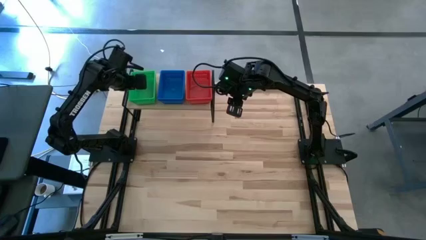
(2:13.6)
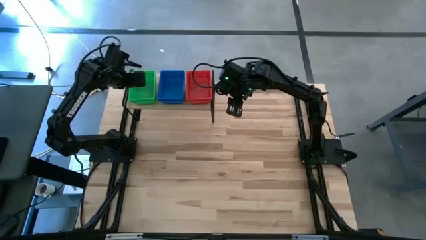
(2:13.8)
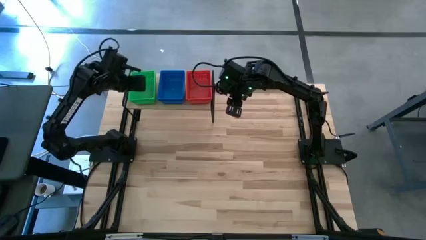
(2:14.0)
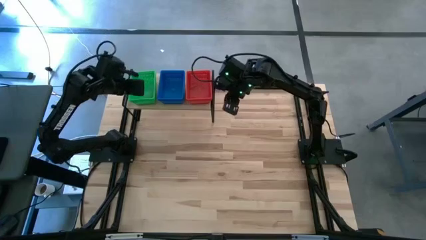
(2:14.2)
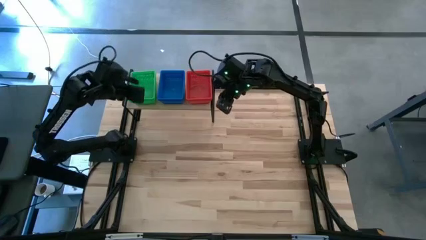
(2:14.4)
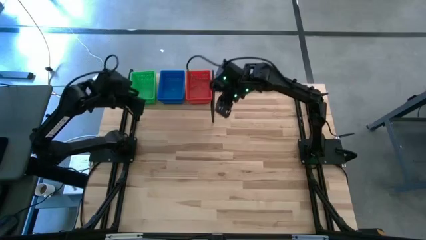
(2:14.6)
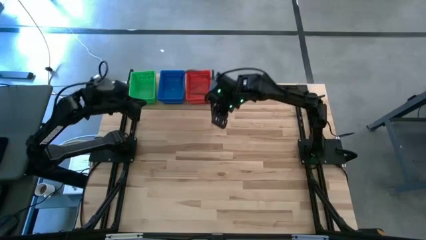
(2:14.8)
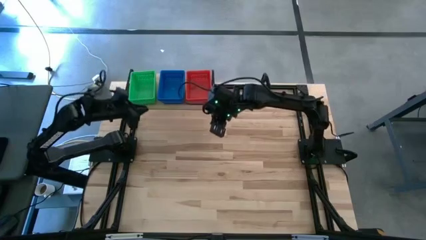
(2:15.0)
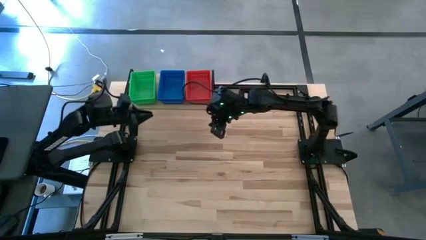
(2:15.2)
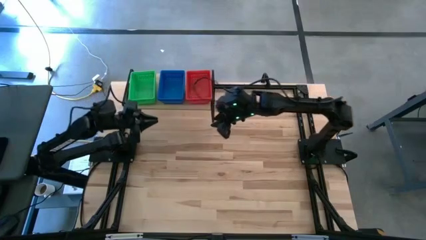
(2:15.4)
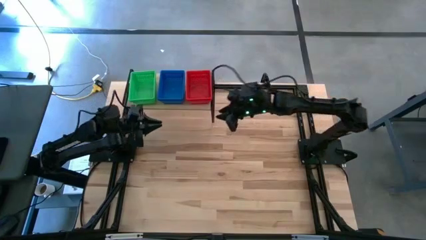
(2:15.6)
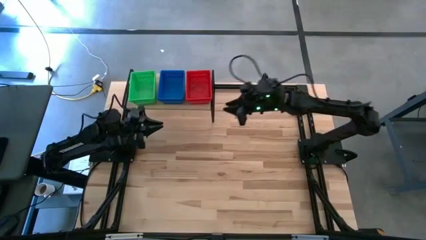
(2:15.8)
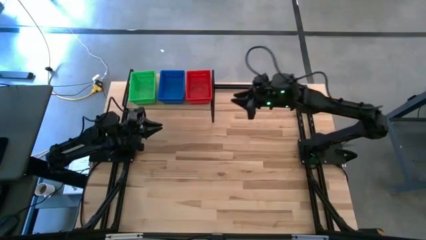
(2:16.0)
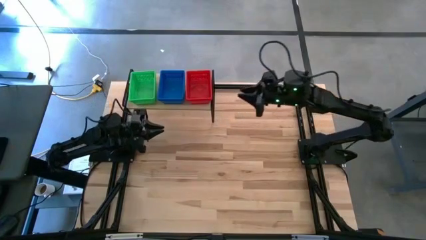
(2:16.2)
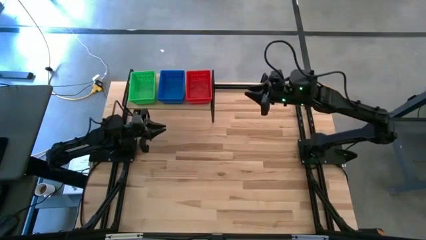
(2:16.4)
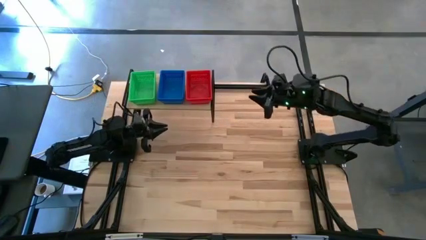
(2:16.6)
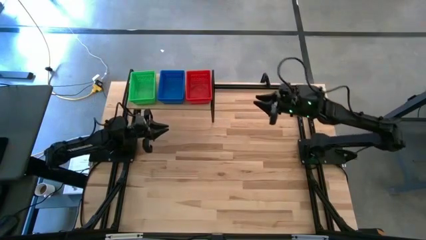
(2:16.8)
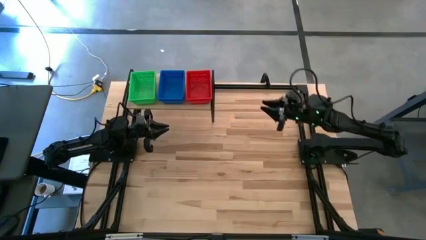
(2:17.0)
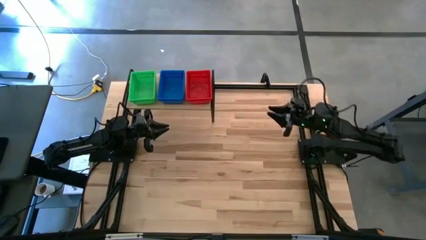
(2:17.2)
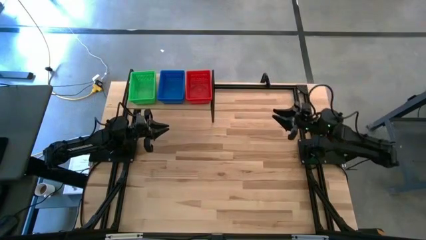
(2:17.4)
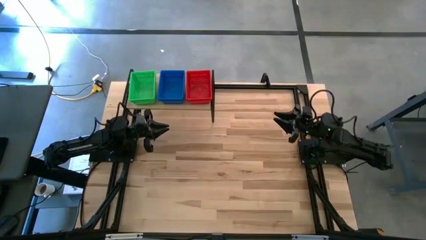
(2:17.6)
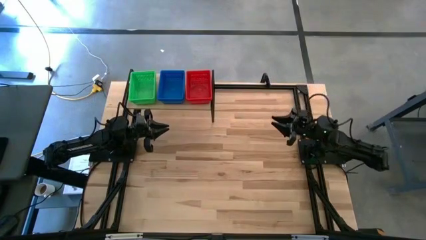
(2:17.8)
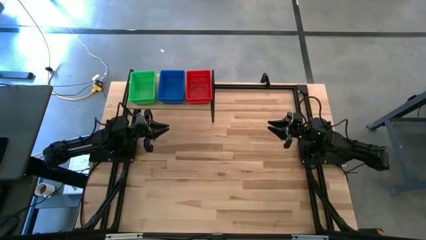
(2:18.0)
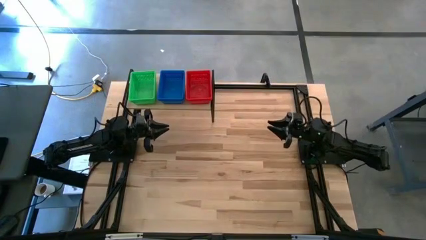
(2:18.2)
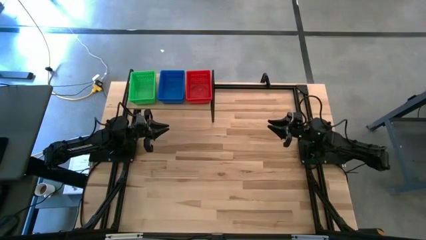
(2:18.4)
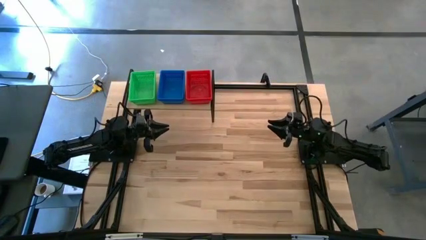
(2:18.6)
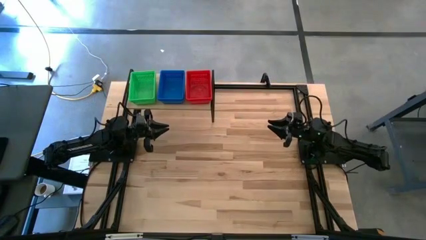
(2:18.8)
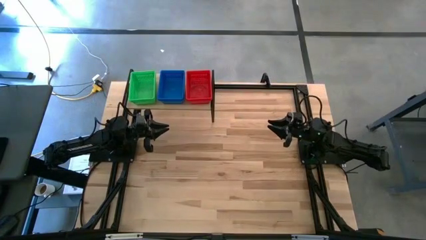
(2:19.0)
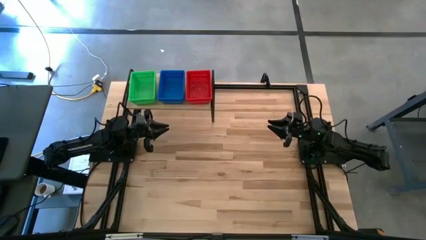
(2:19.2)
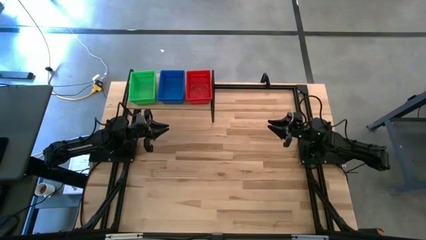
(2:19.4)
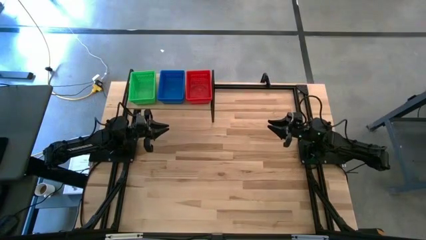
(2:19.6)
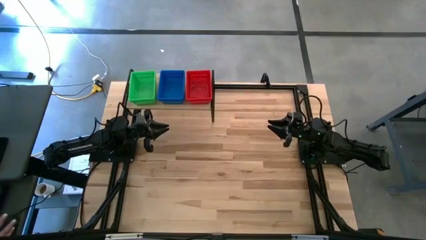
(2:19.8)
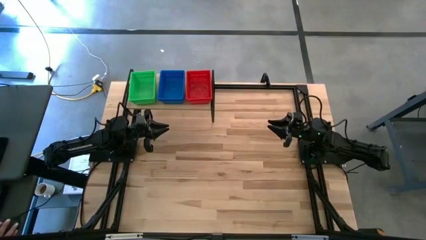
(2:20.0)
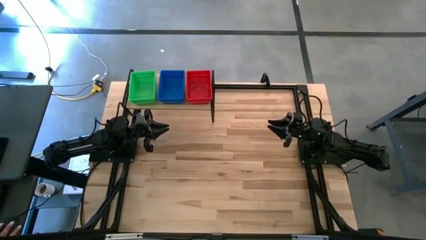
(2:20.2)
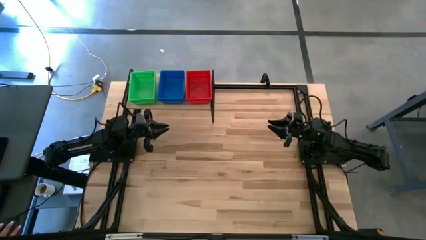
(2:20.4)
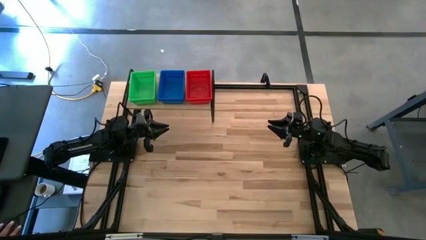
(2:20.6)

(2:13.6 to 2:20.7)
Task: Stack baskets on shelf by color
Return to Home Position

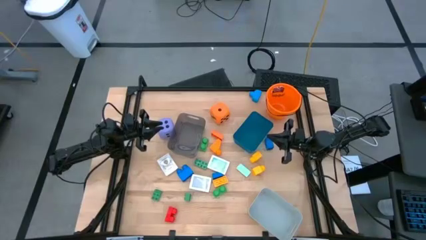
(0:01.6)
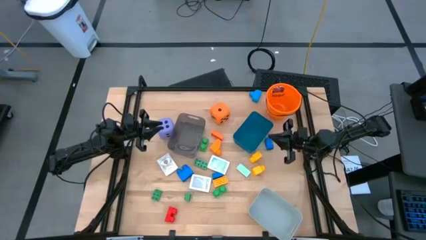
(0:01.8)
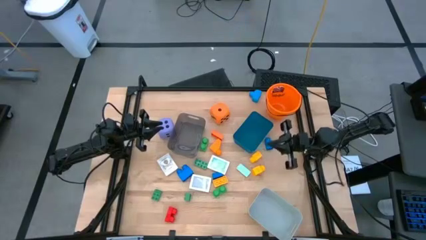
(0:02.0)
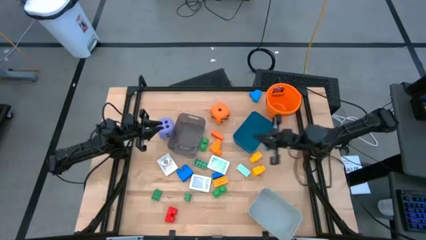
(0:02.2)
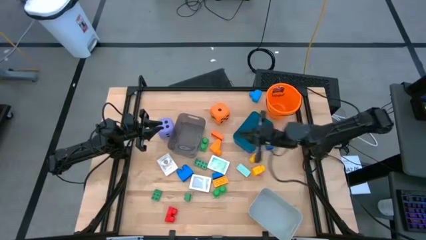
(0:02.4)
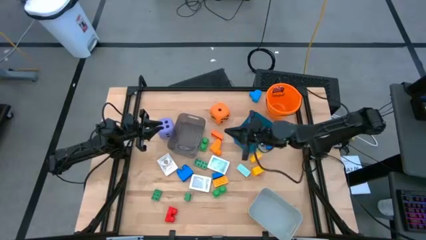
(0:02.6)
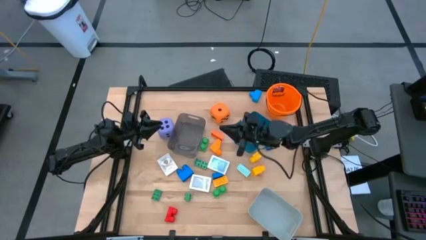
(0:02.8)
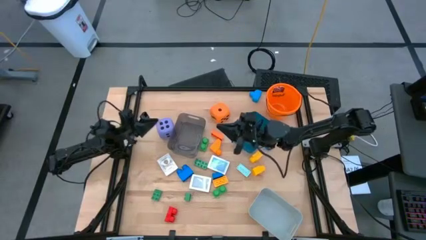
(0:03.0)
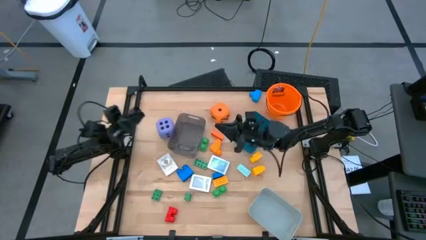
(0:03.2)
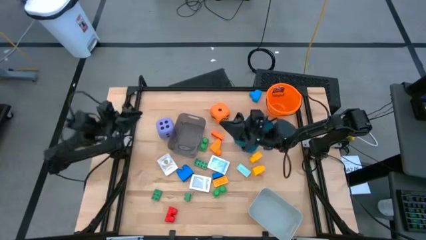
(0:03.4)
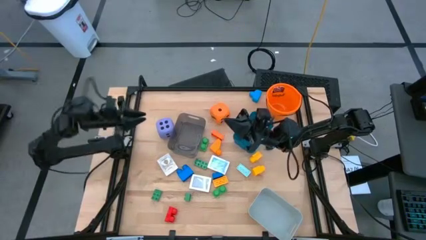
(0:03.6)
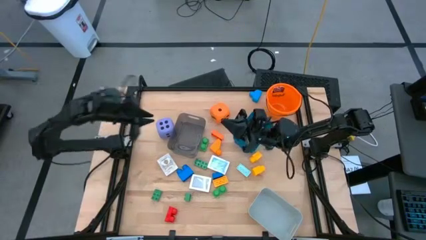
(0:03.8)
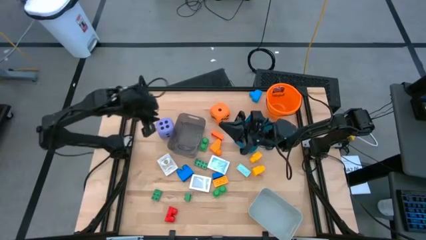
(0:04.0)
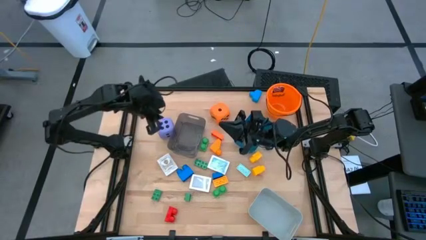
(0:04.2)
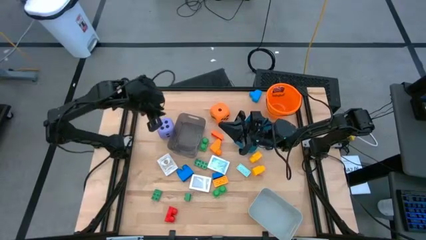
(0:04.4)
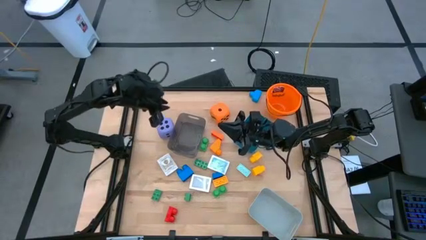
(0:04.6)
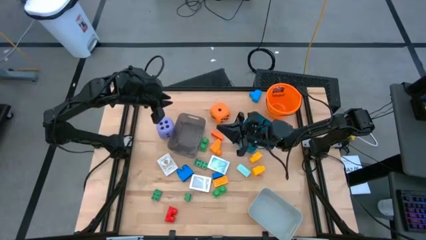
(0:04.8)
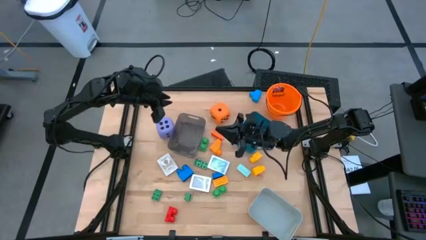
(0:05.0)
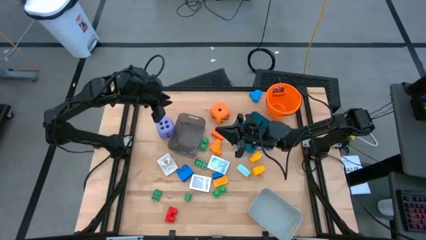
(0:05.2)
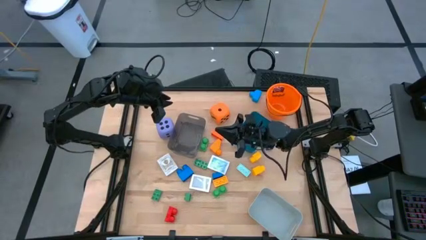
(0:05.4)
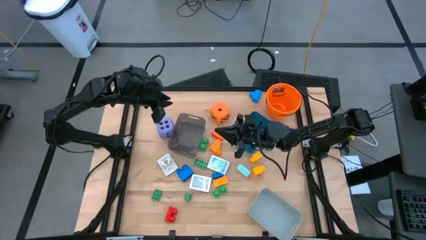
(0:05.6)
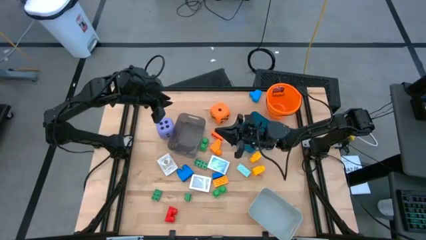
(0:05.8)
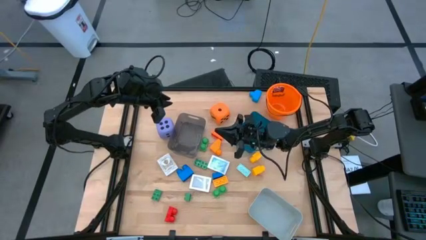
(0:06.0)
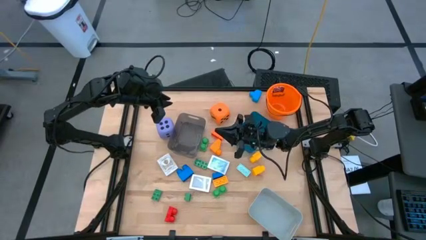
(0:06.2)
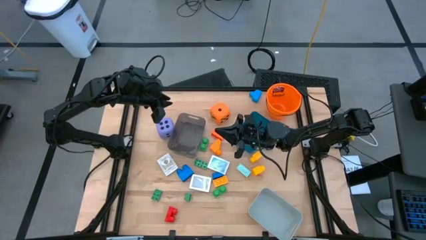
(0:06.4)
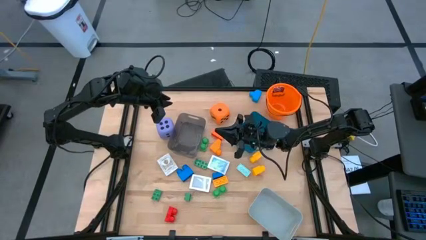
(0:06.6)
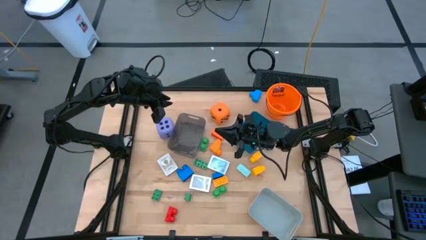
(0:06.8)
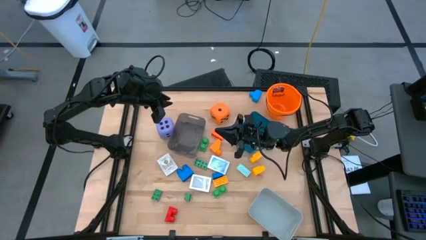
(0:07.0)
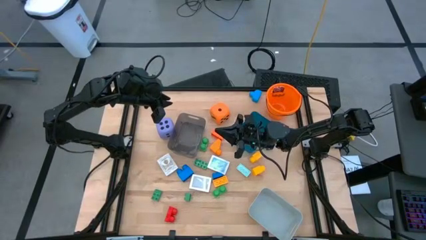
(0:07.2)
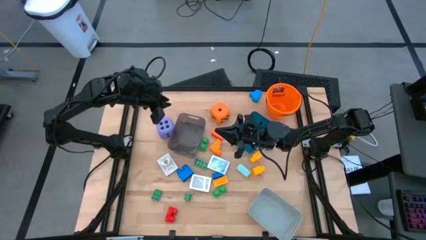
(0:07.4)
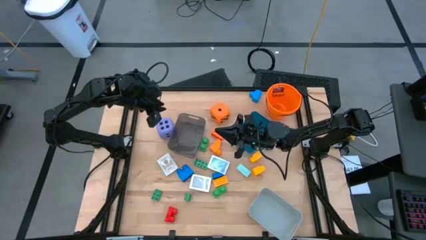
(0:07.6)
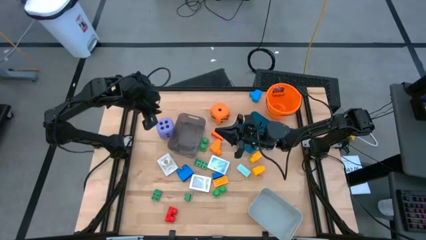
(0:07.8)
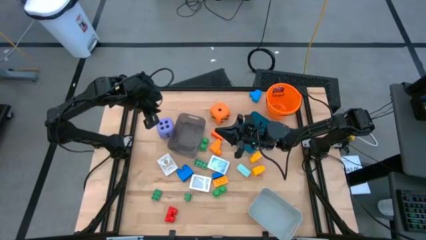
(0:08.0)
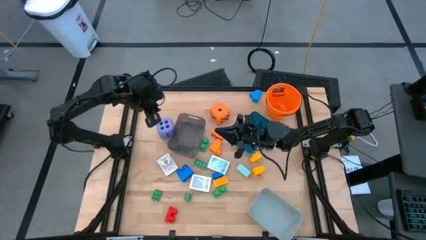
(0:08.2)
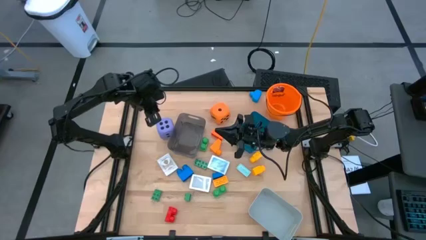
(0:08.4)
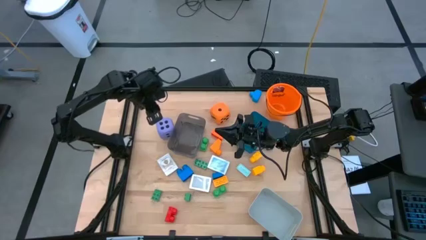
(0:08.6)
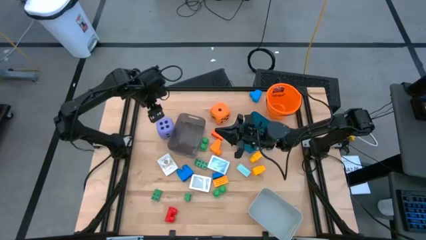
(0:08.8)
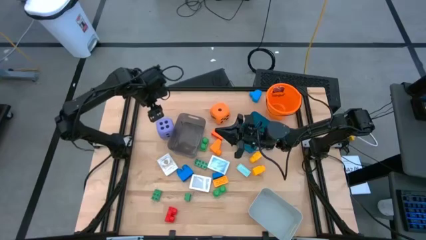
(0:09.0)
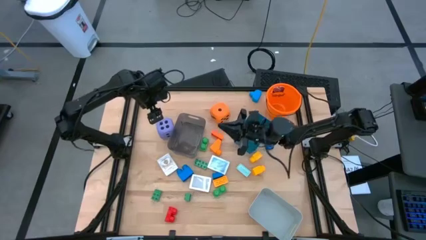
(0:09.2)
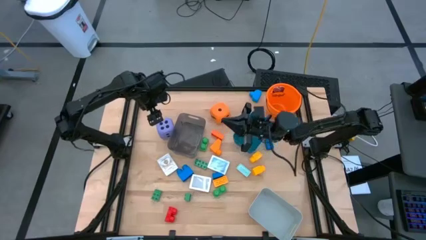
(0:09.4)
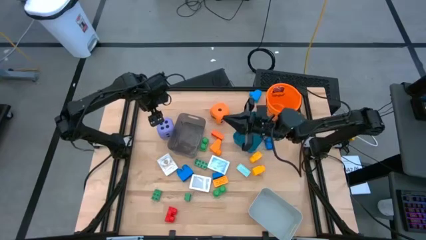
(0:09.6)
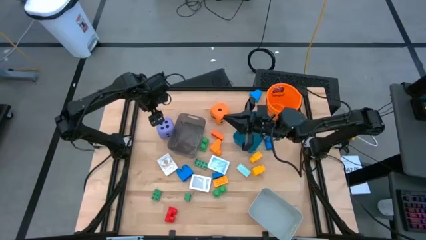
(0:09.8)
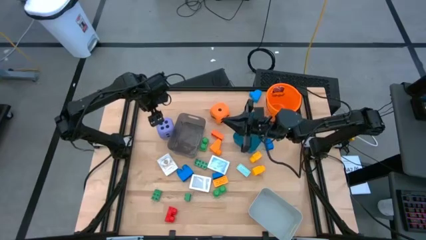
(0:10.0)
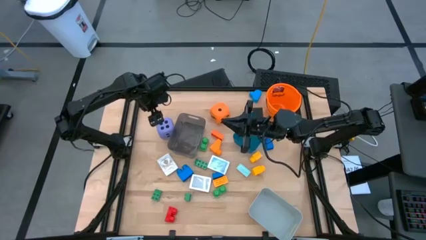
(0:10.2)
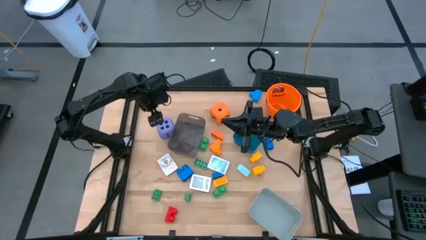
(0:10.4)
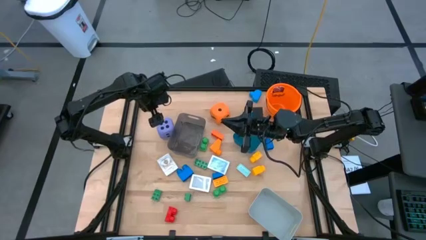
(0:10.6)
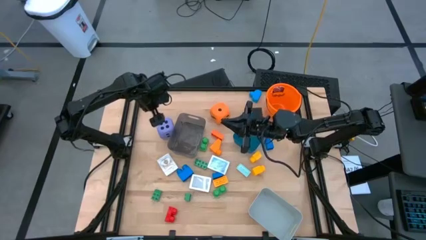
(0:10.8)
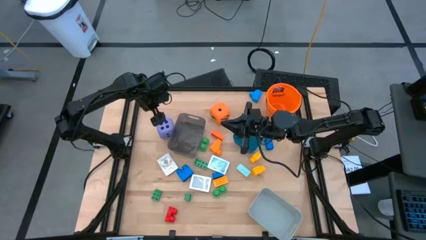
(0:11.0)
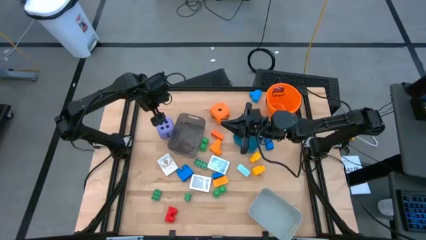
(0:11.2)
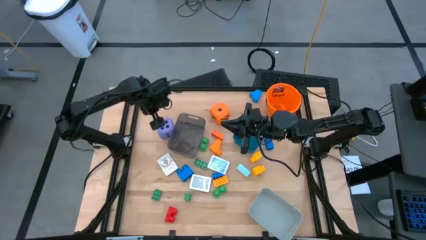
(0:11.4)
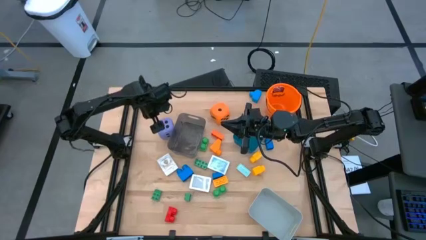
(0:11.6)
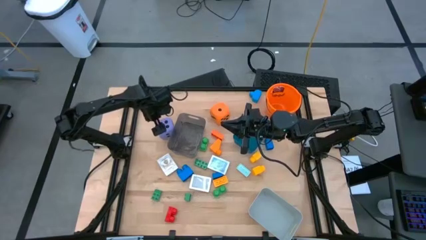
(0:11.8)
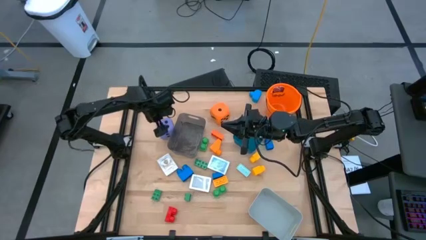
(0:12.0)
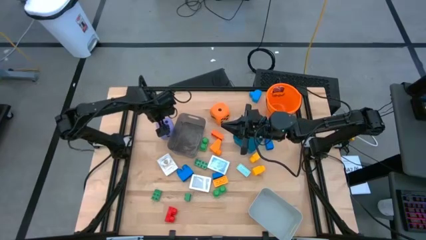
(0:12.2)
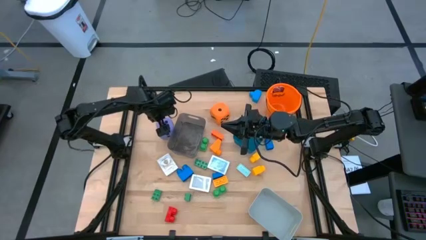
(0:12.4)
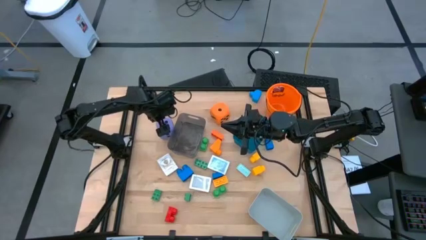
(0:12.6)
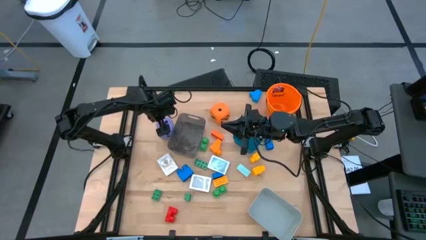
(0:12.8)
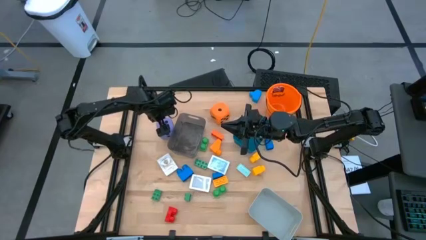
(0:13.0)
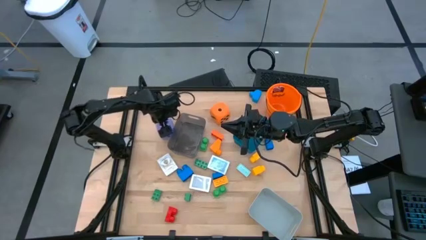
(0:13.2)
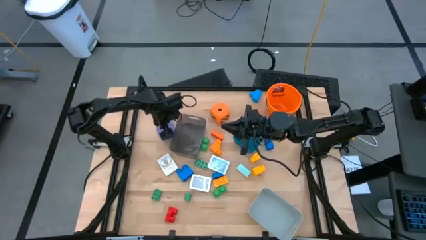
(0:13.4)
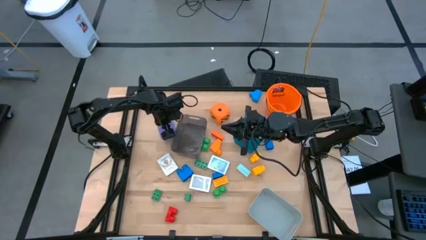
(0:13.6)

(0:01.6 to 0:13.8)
Task: Pick & Place Toys
Put the purple dice into the black bin
